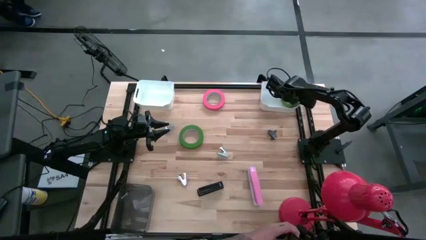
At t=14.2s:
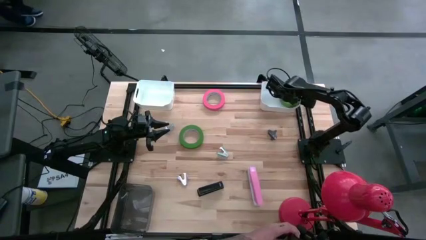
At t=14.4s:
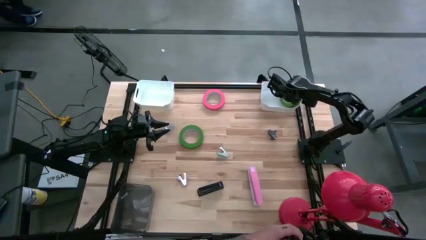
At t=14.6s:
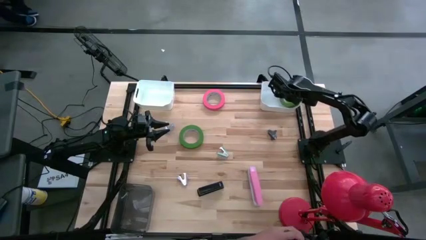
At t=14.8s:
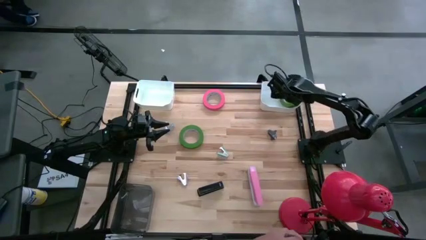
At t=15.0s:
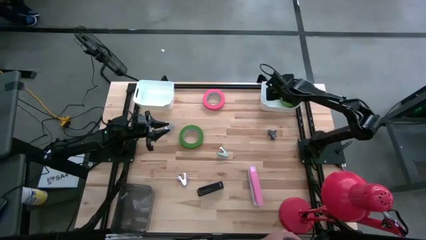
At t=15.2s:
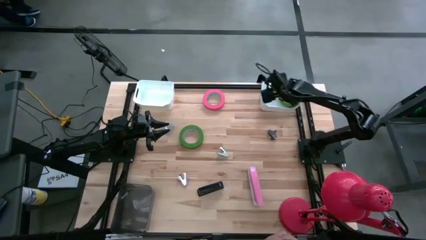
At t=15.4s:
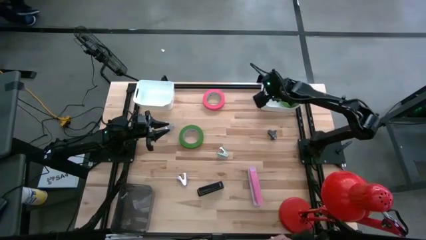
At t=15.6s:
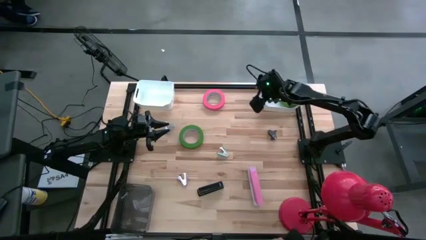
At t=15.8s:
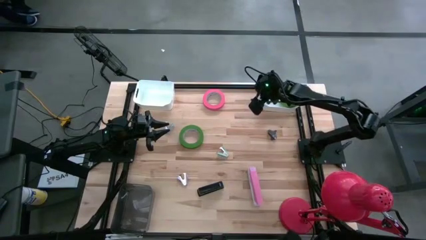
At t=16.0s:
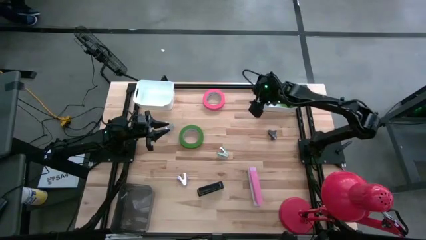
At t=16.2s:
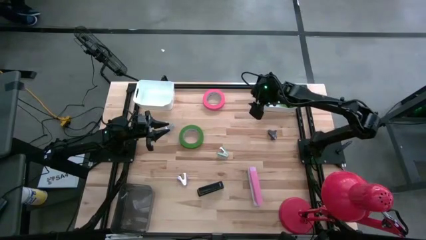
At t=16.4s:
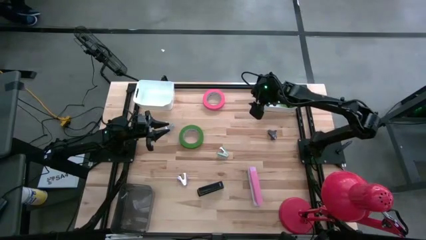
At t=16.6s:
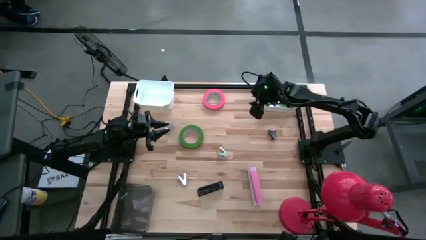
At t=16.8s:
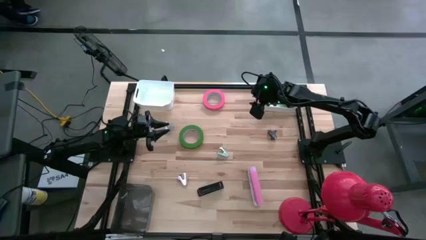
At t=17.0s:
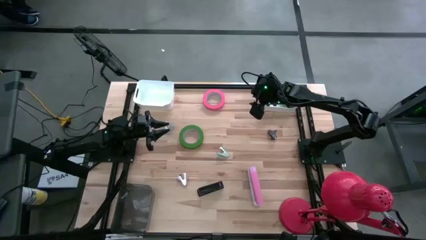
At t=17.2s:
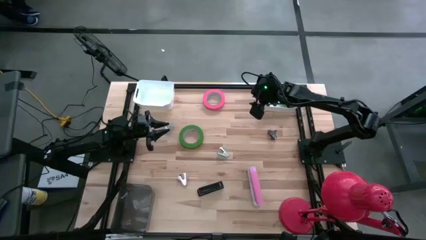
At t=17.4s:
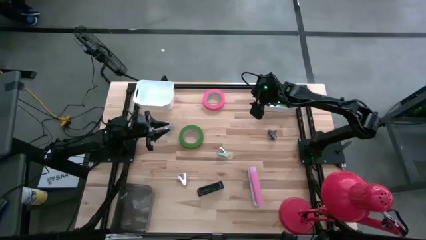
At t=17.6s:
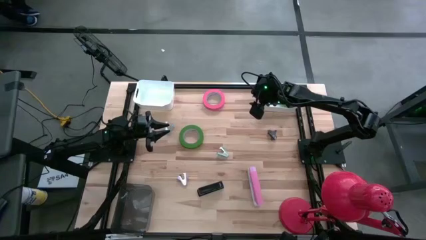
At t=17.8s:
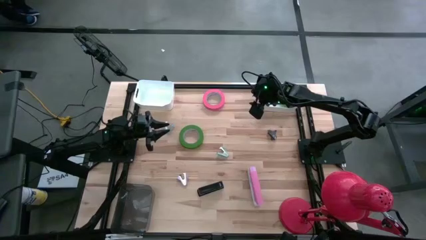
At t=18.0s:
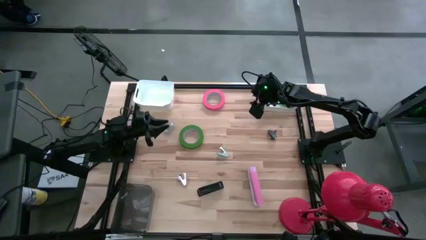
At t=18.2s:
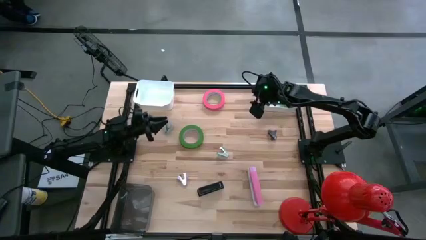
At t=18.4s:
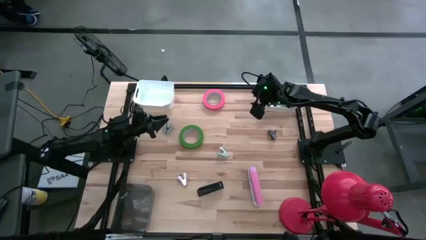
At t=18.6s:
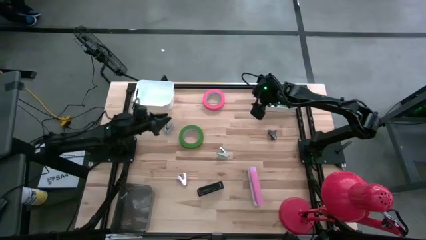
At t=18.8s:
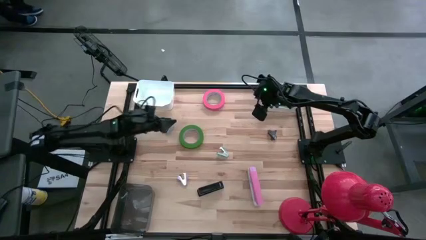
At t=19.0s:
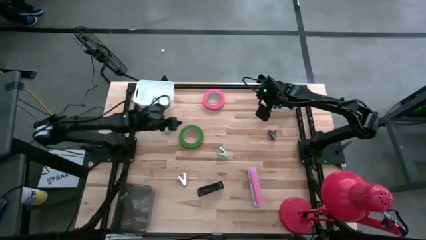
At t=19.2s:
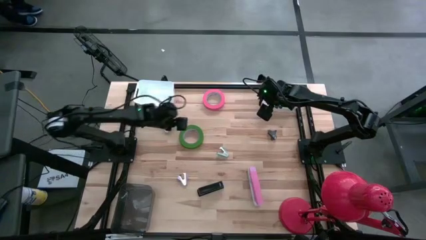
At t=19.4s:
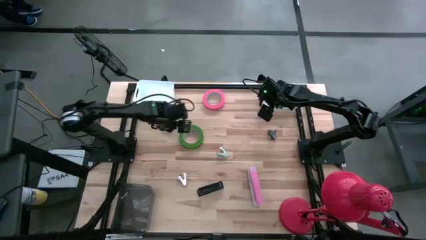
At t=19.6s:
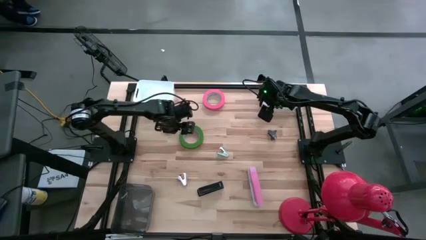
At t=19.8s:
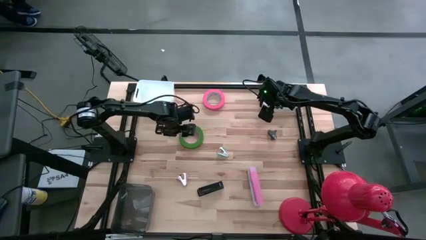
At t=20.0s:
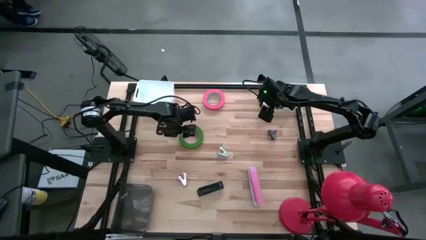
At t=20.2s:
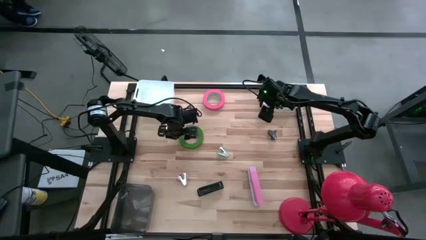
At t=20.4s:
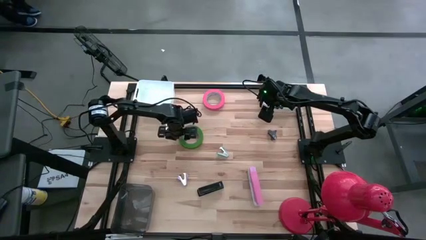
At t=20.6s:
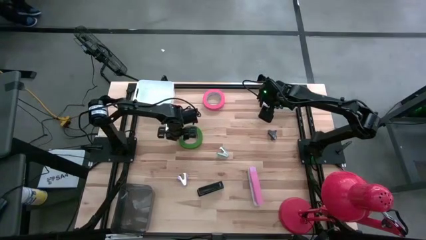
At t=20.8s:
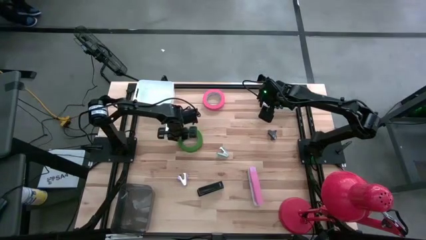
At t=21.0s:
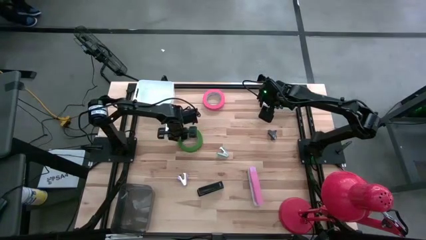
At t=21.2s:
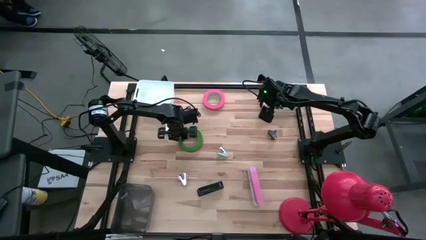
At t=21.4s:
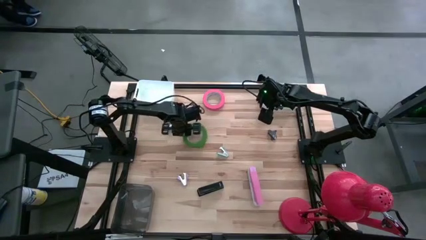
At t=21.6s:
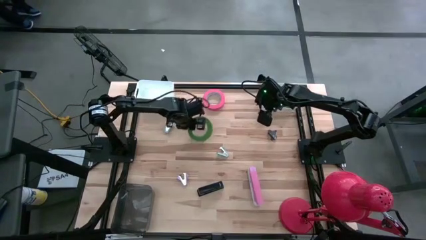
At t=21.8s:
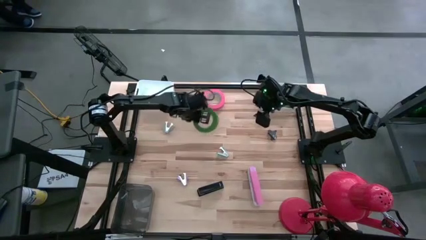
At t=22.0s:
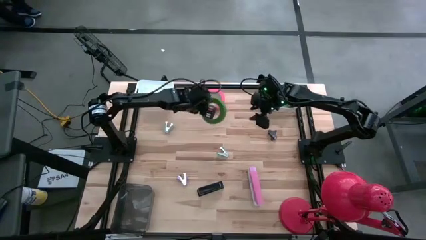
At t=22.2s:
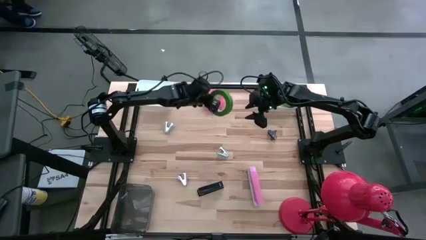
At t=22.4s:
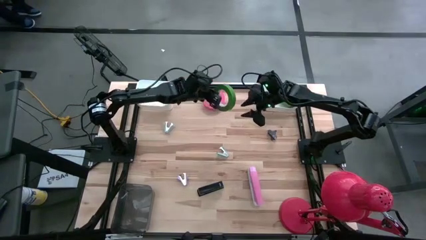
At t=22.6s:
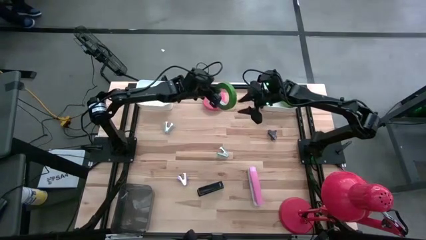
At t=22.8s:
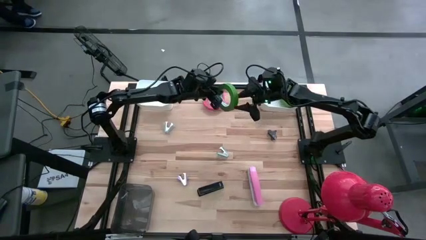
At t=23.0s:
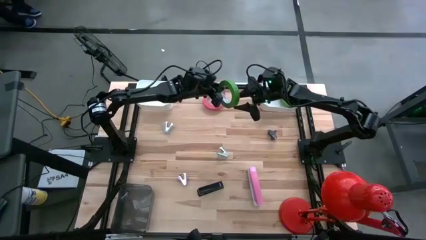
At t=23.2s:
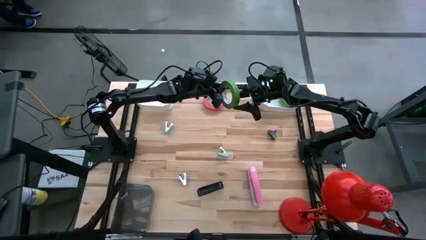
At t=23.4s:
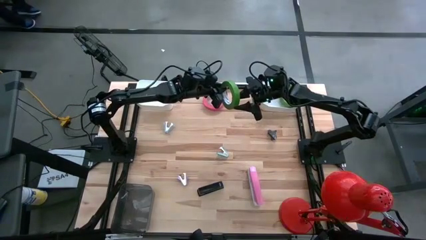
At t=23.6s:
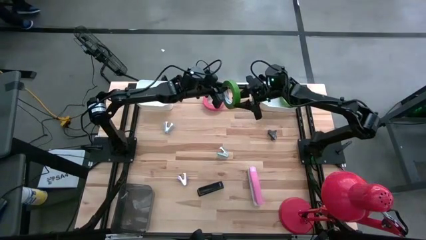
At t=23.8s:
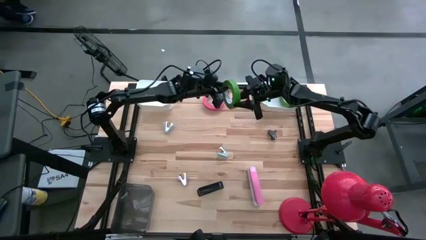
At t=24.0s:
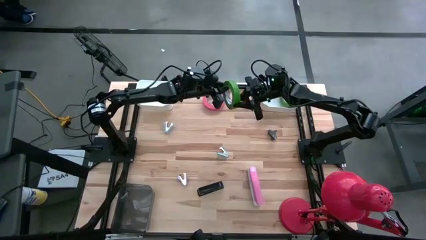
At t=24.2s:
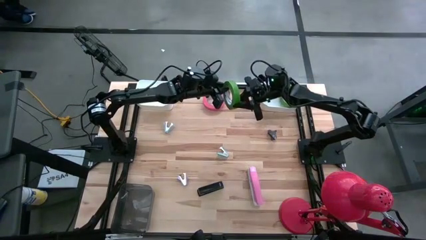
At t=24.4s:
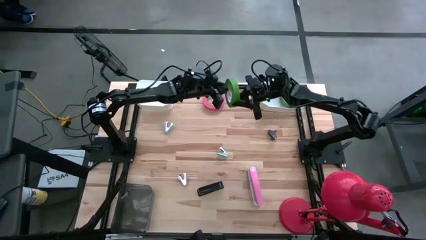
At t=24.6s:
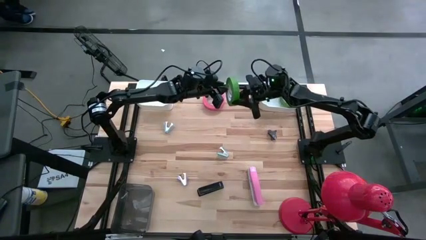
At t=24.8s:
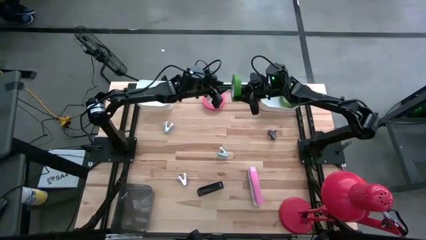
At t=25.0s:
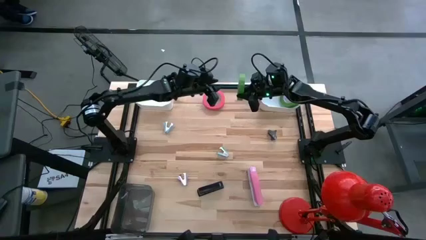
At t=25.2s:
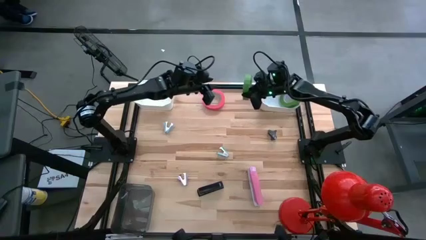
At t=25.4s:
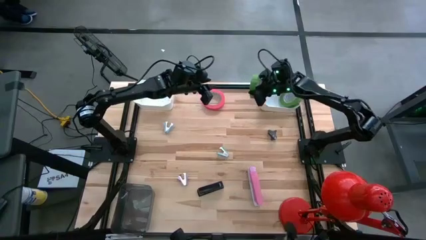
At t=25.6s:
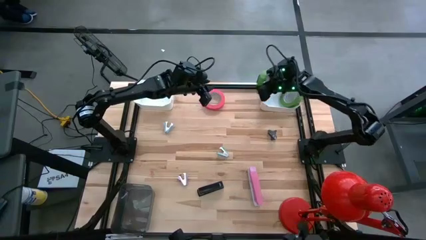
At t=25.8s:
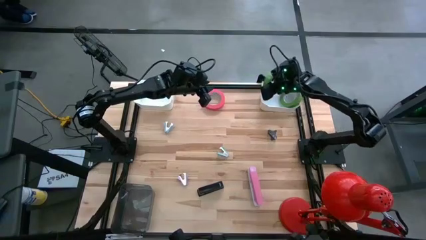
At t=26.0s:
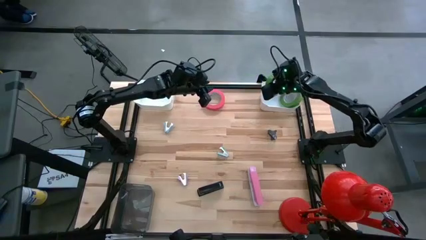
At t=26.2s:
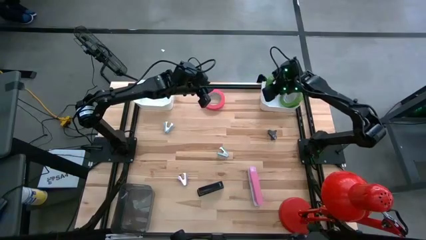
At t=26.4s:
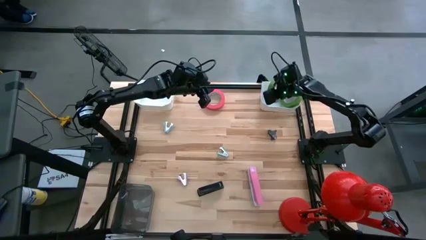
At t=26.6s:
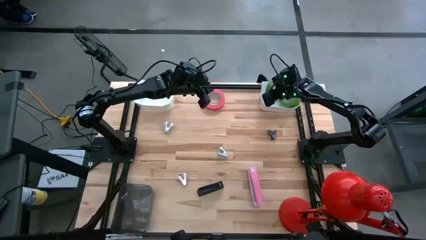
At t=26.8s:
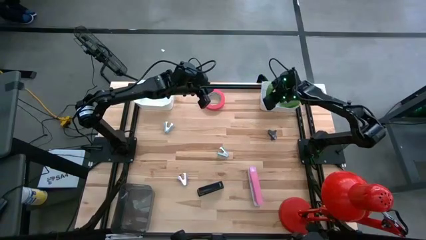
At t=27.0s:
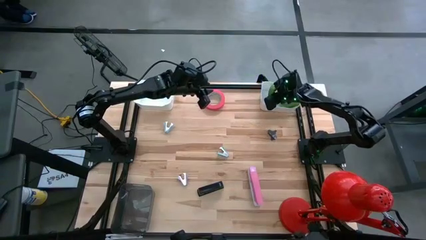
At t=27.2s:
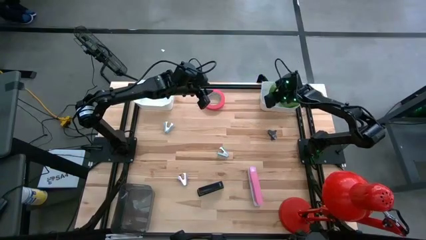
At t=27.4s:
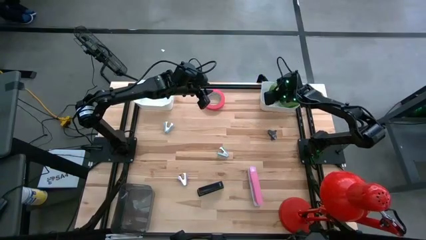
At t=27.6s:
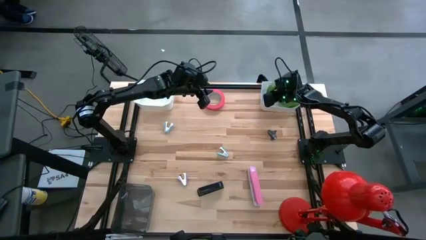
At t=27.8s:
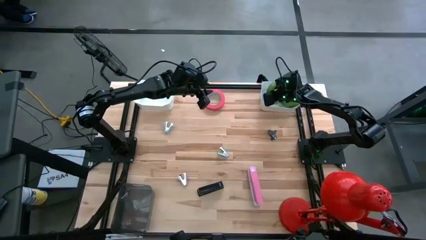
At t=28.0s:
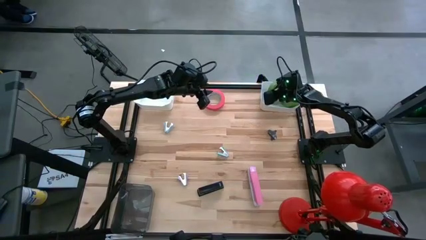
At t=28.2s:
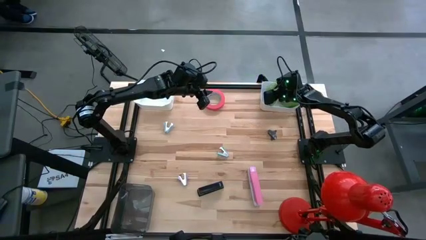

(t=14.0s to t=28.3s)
Task: Pick and place Stapler, Stapler remover, tape
Put the green tape into the right white bin
